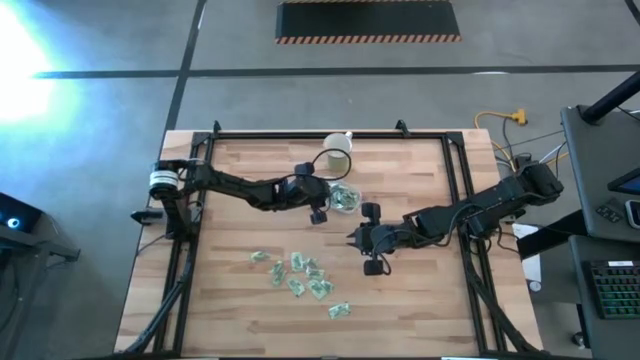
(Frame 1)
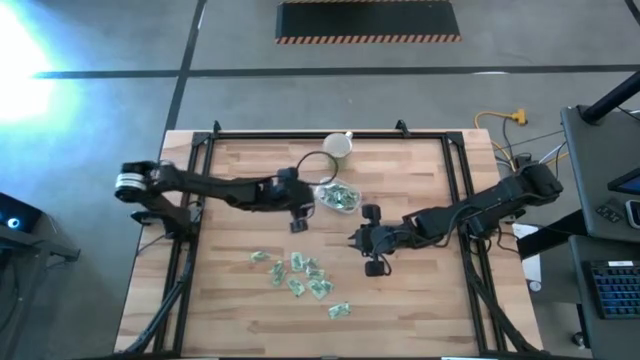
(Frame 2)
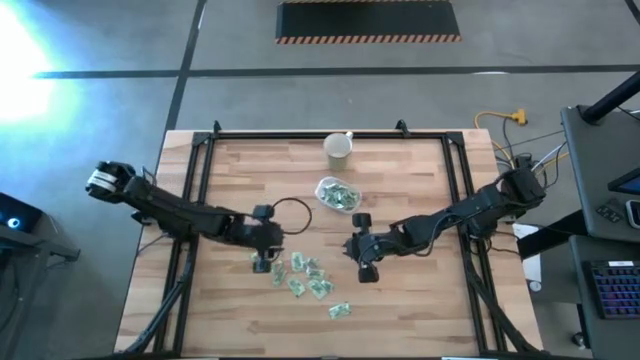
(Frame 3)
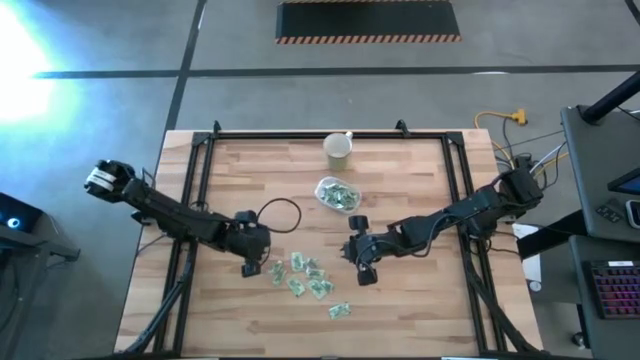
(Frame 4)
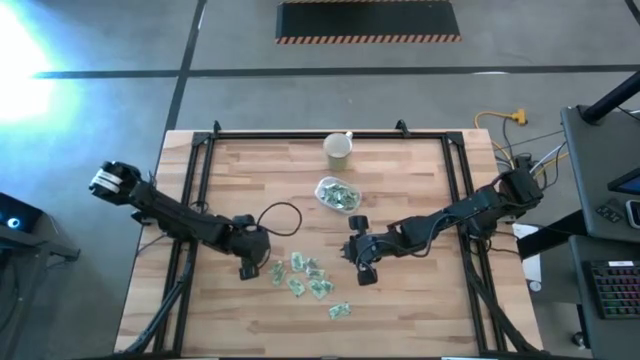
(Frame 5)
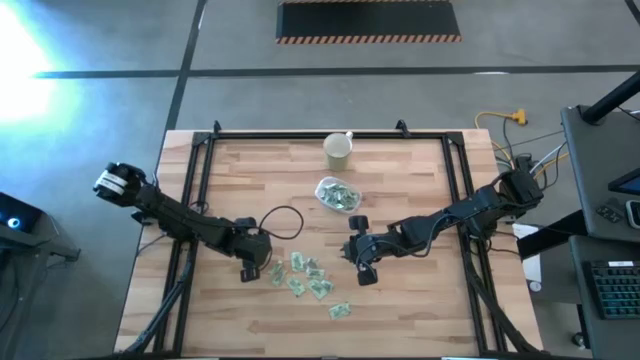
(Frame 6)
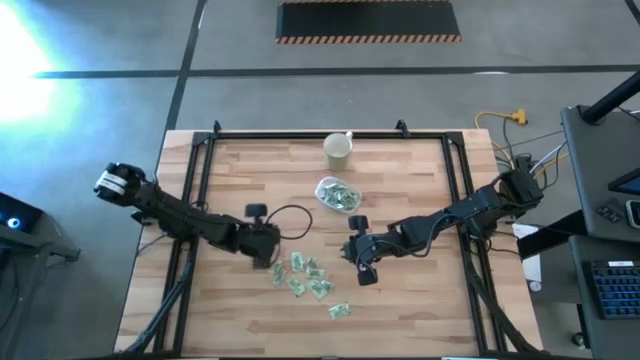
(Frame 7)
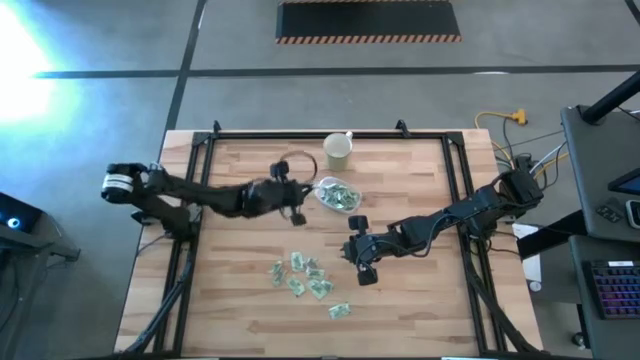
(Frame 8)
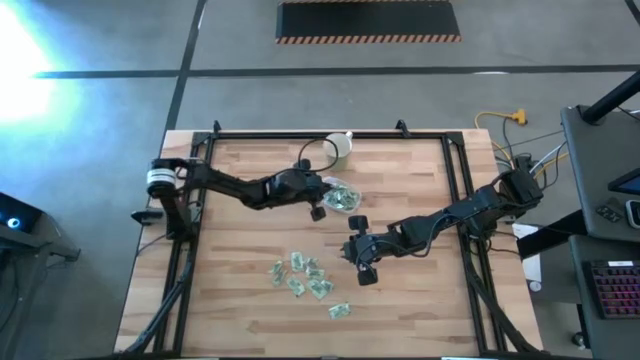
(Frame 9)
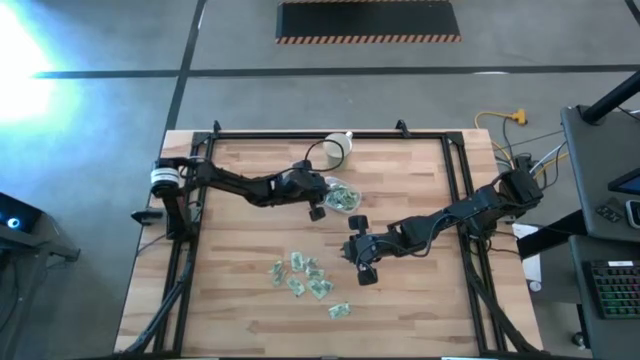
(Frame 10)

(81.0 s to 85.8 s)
Task: Pick and place items into bin
Put the green stevia packet into the transparent bin

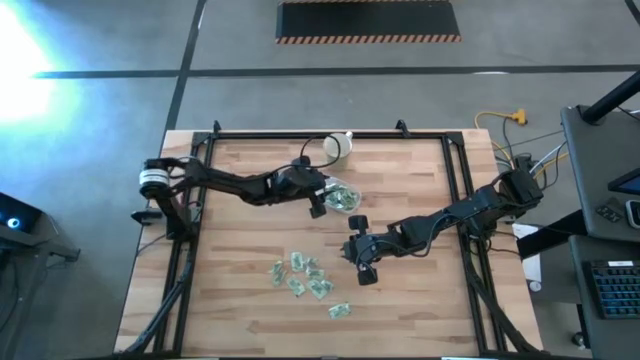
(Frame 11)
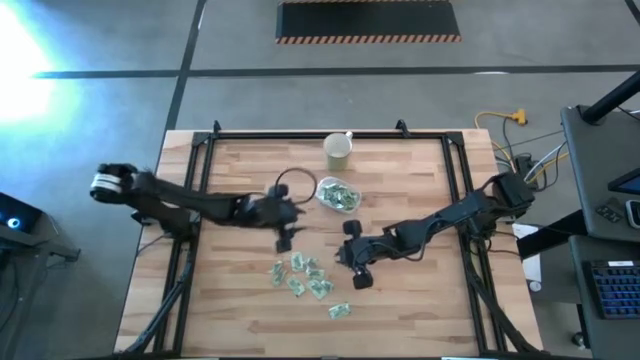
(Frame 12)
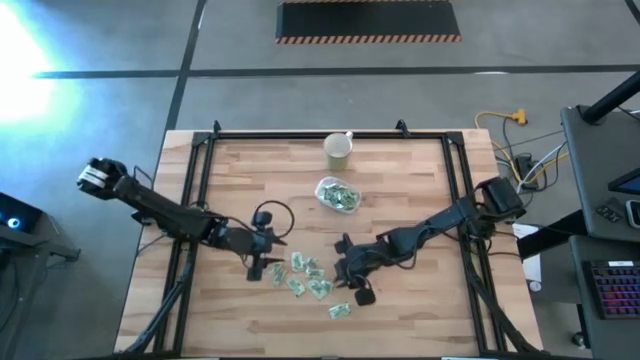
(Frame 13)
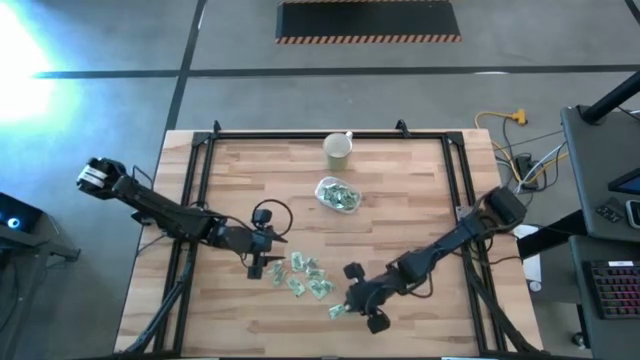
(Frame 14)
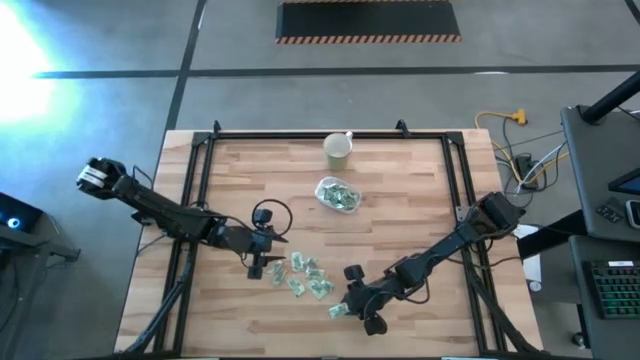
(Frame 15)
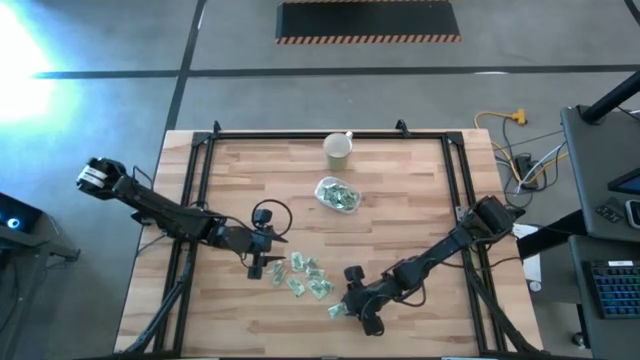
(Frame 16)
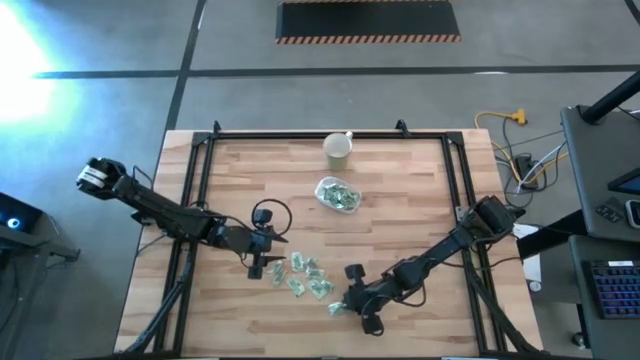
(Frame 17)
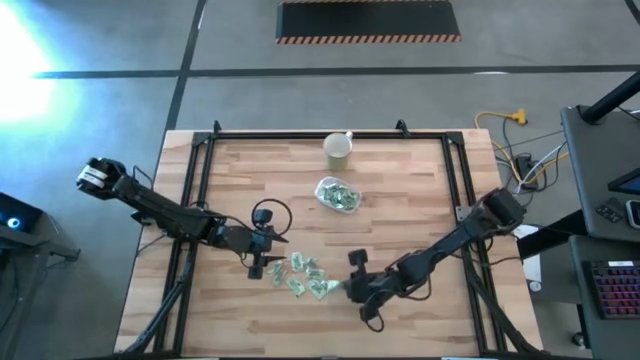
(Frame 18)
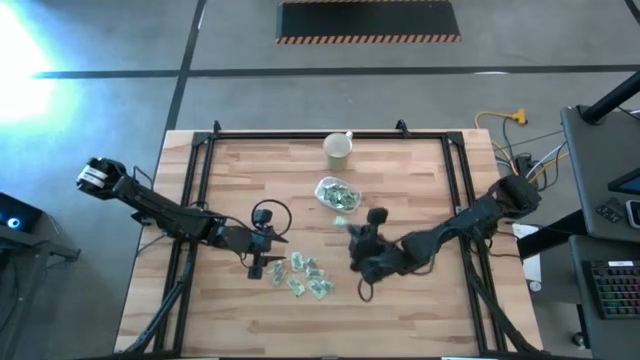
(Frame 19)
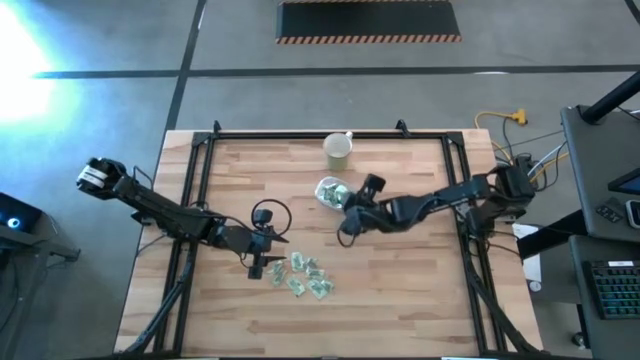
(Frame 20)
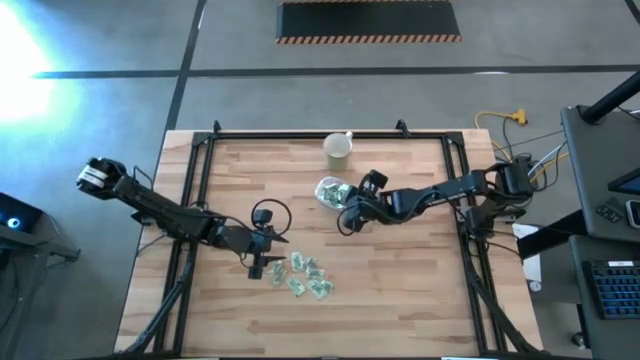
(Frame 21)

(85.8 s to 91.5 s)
Put the green stevia packet into the transparent bin

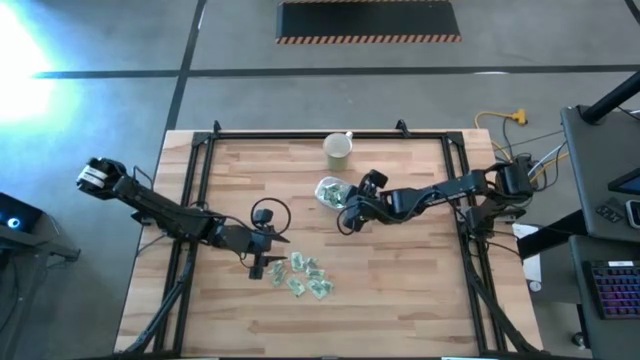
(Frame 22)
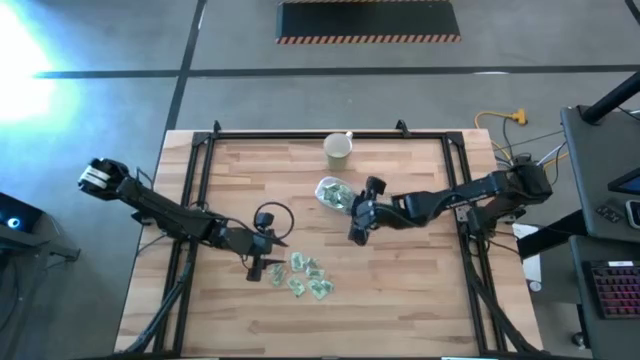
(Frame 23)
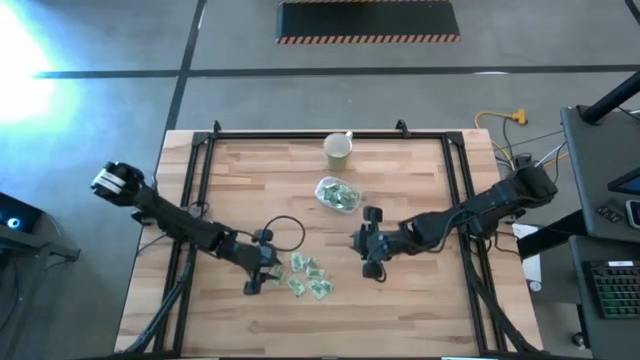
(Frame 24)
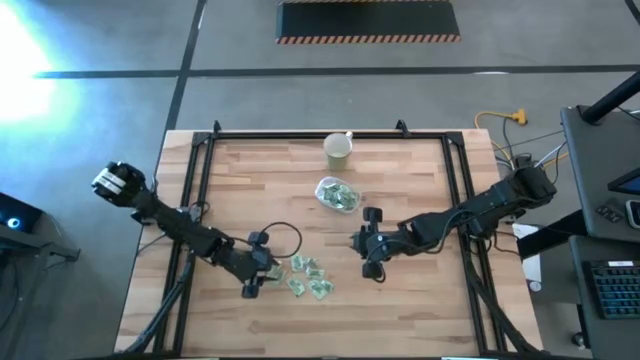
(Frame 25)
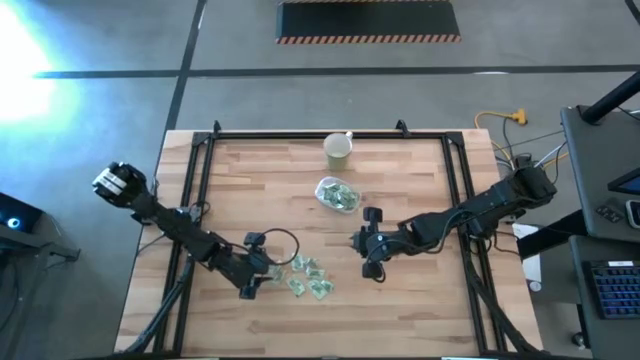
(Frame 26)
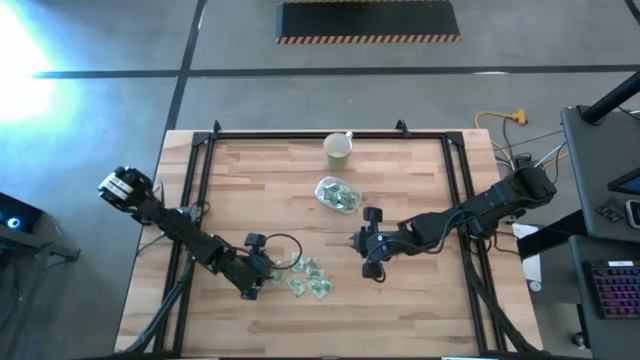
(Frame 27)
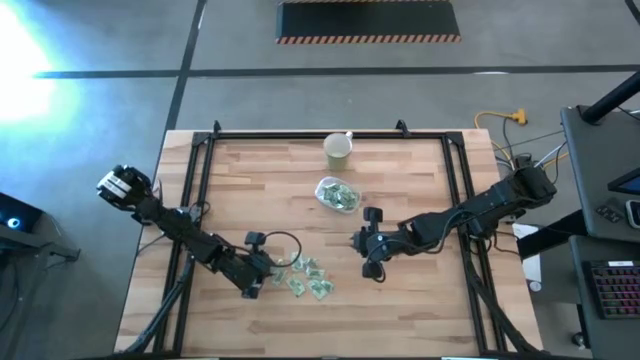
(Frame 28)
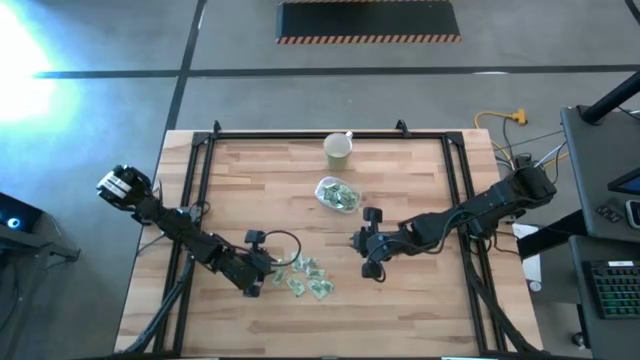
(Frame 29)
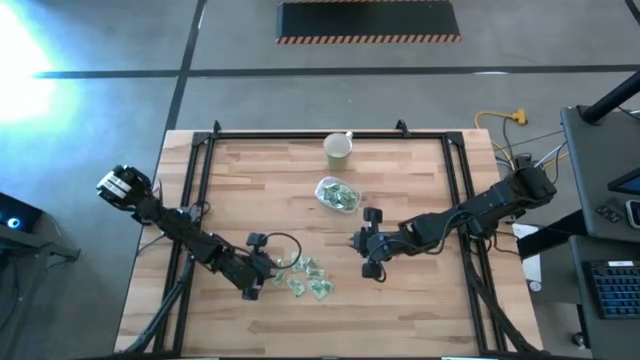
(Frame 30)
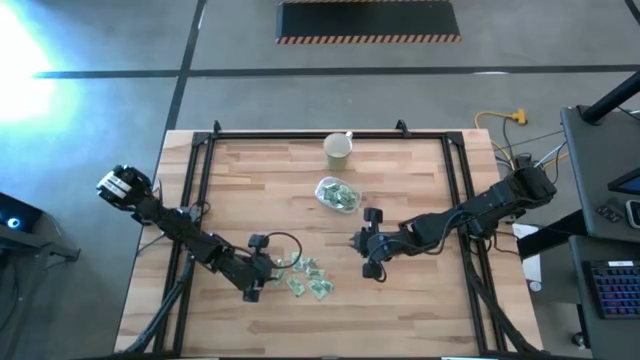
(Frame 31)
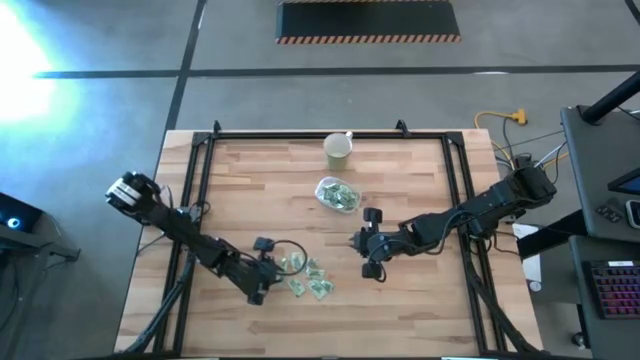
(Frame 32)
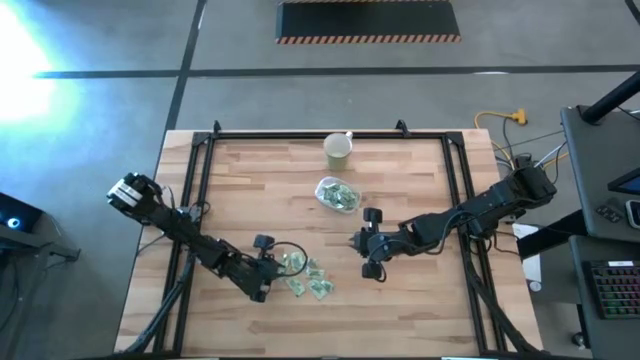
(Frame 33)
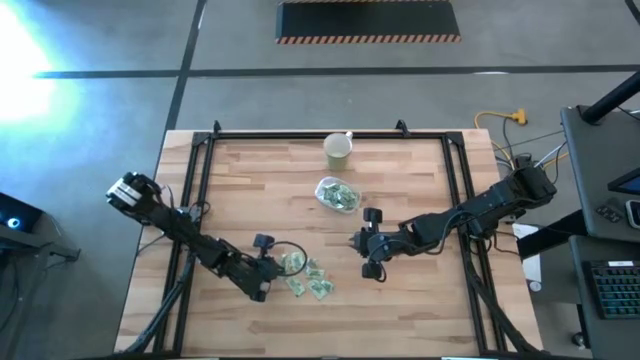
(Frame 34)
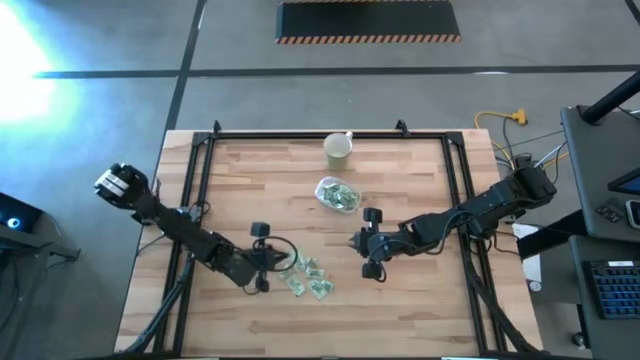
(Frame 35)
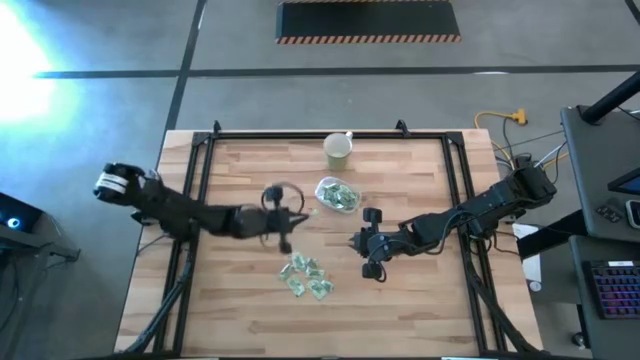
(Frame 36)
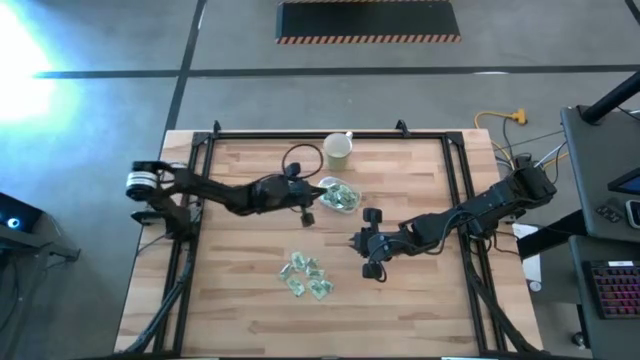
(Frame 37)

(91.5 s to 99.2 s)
Put the green stevia packet into the transparent bin

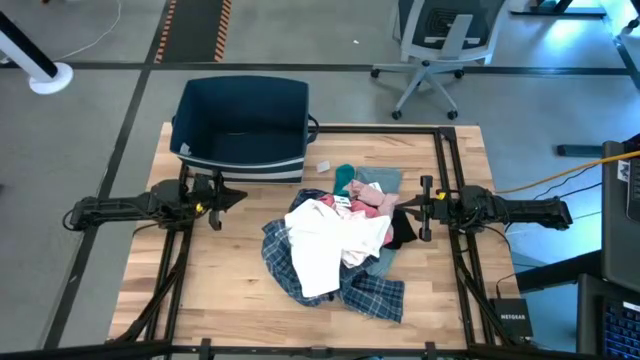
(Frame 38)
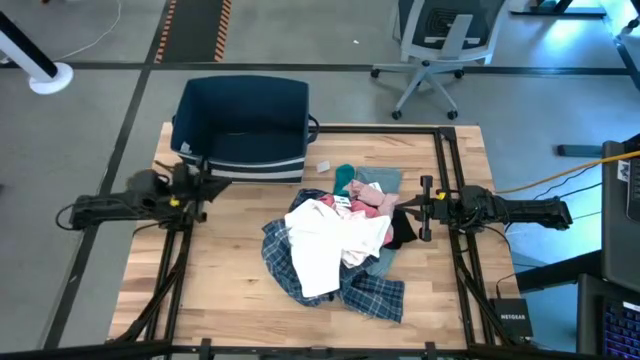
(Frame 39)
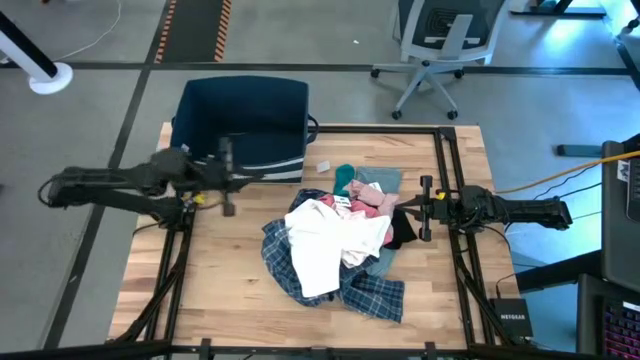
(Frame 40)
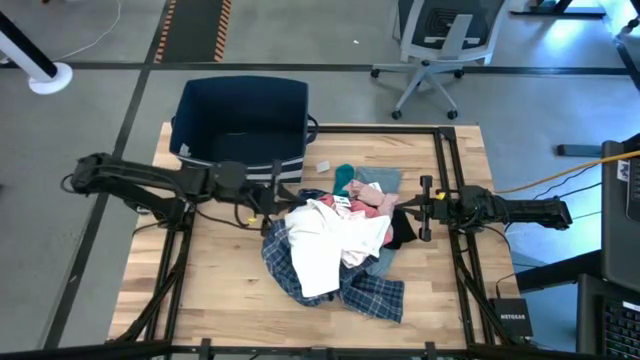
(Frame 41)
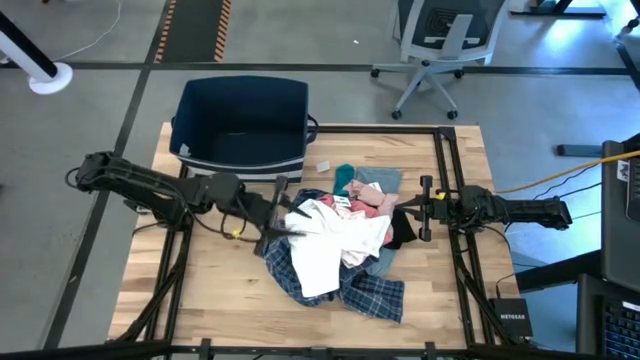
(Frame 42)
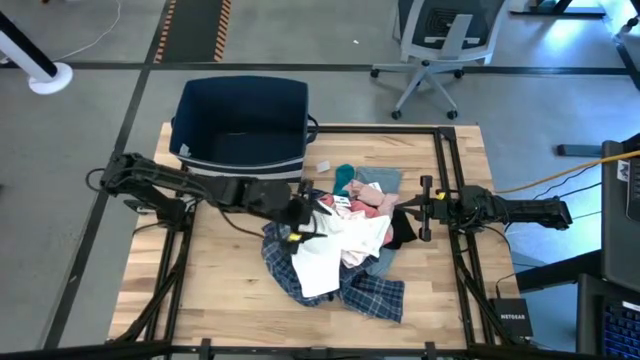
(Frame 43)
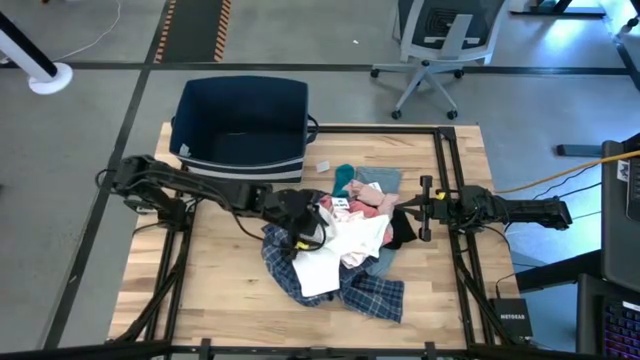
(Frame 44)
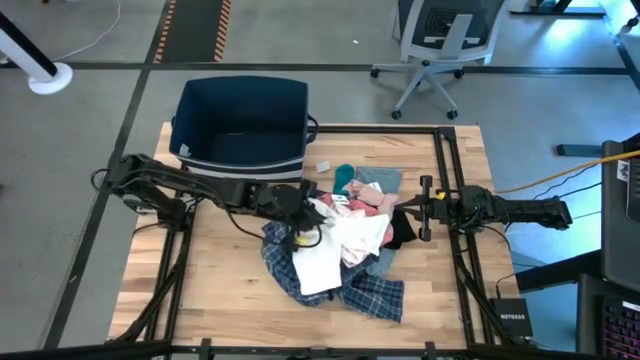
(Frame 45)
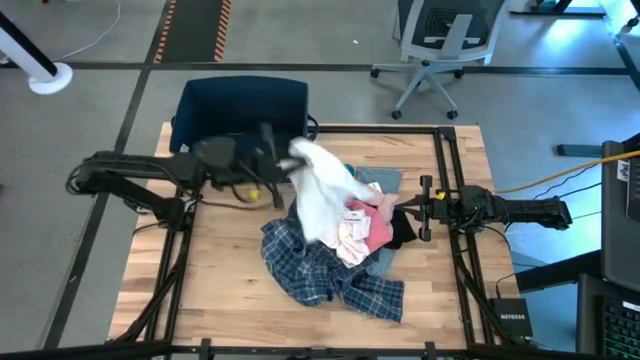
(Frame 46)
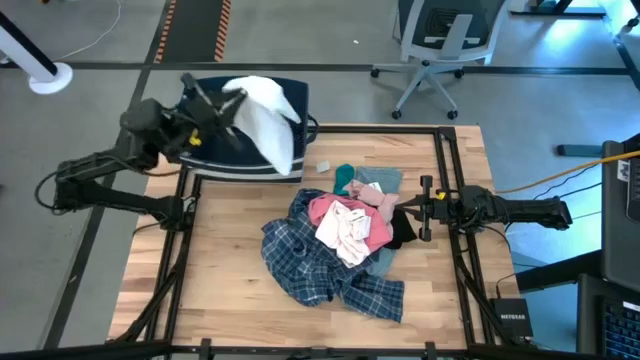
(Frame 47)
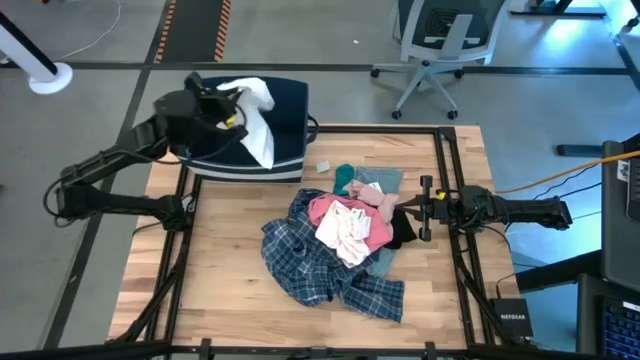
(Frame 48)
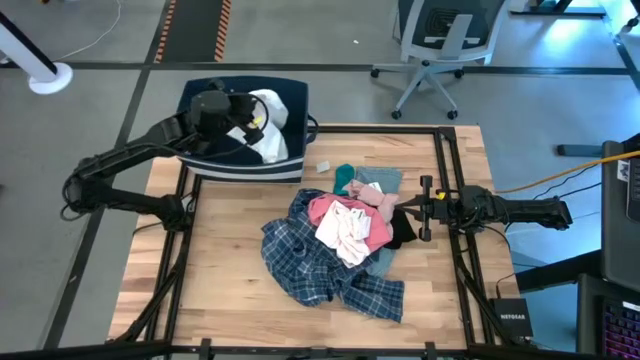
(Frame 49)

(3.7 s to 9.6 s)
Task: Sort clothes
Put the white short pants into the blue laundry bin
